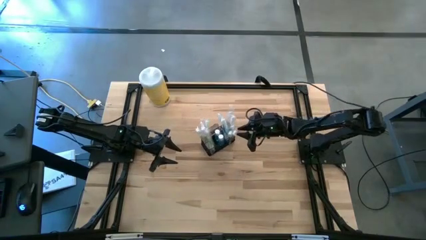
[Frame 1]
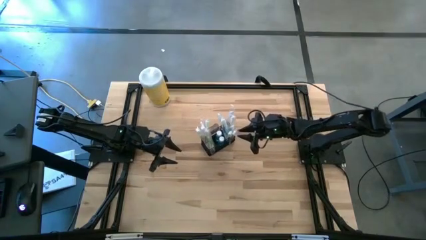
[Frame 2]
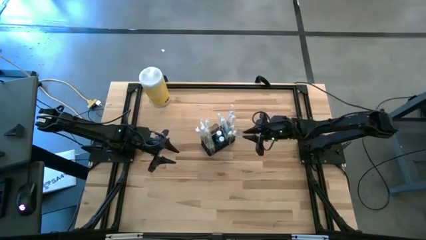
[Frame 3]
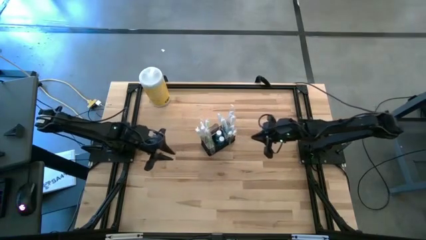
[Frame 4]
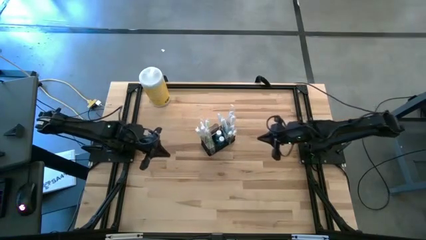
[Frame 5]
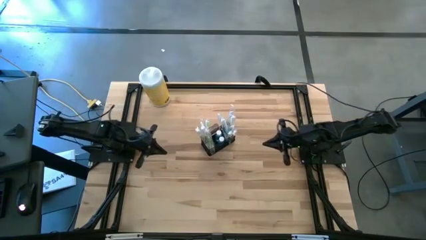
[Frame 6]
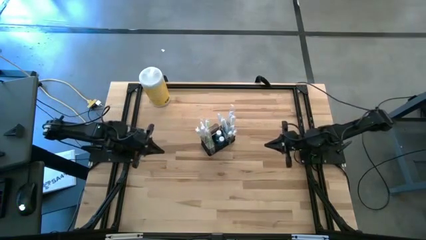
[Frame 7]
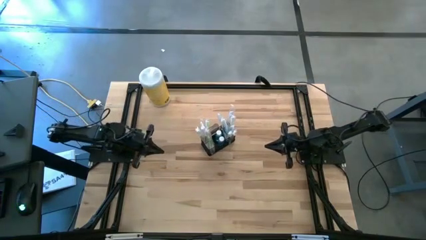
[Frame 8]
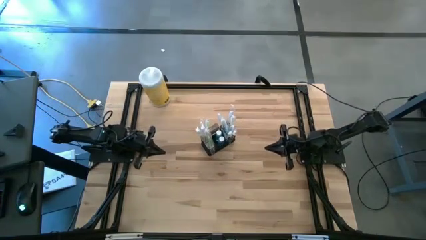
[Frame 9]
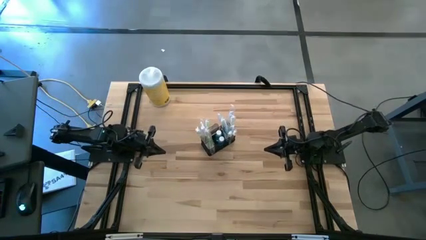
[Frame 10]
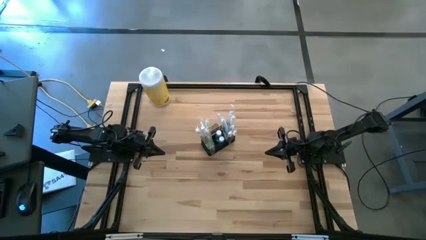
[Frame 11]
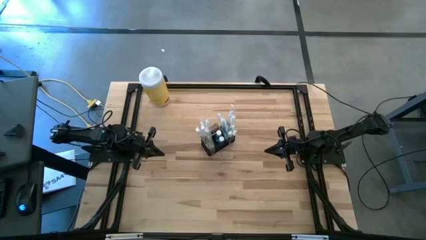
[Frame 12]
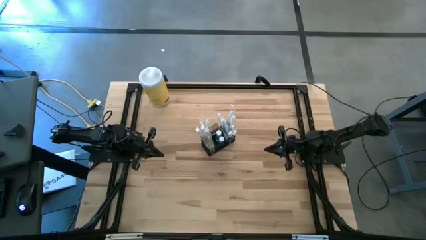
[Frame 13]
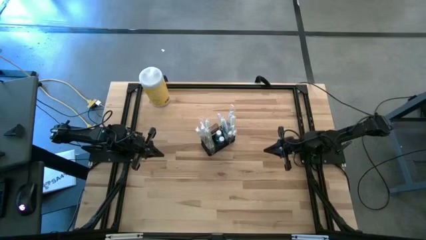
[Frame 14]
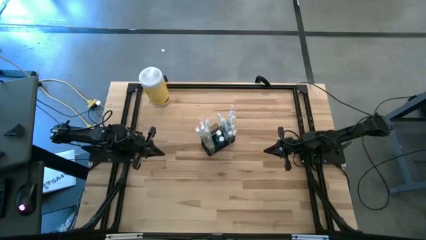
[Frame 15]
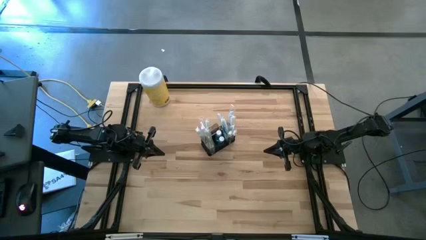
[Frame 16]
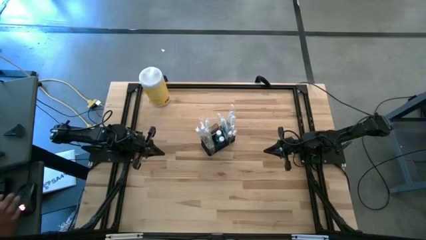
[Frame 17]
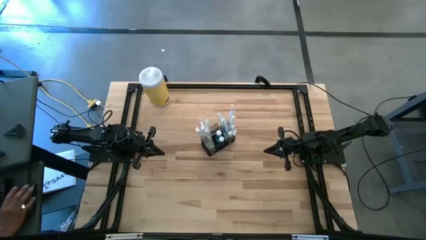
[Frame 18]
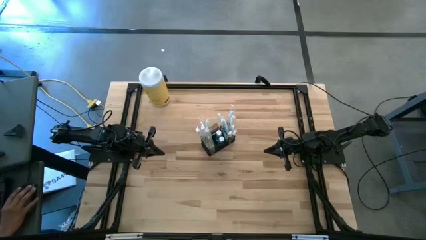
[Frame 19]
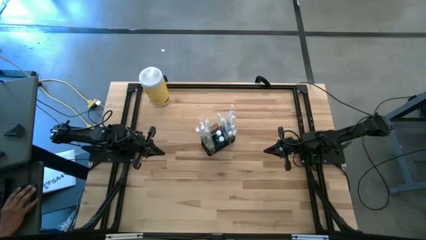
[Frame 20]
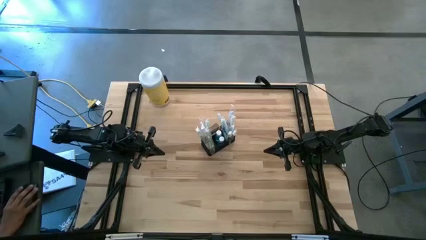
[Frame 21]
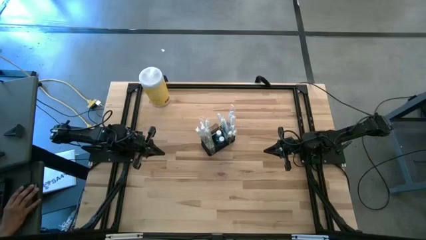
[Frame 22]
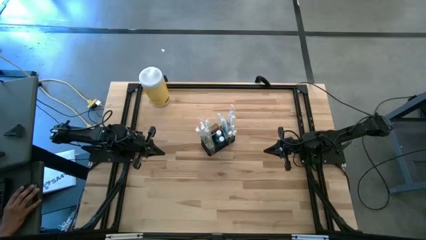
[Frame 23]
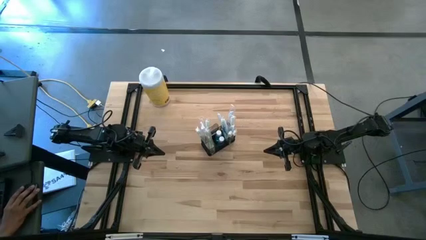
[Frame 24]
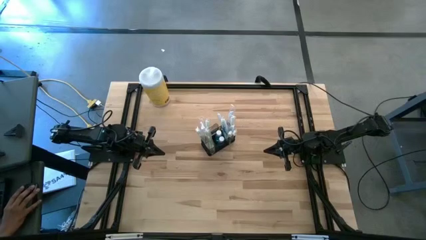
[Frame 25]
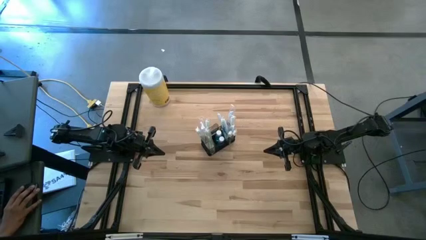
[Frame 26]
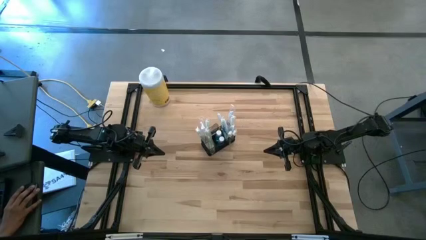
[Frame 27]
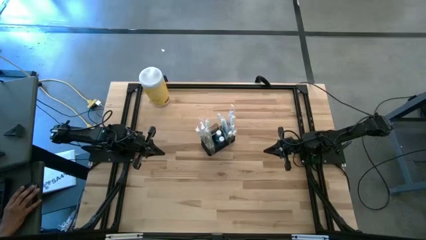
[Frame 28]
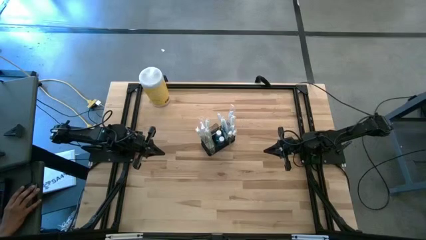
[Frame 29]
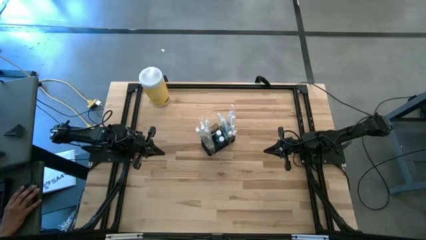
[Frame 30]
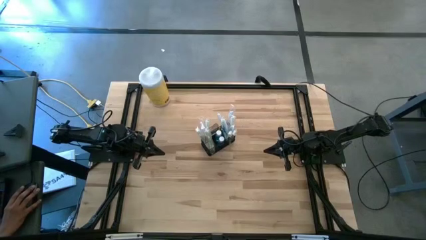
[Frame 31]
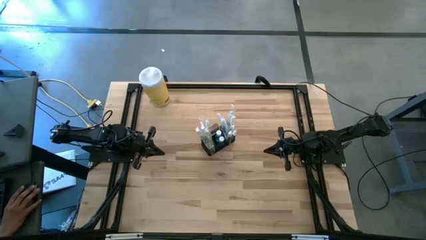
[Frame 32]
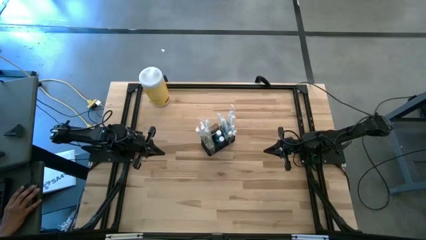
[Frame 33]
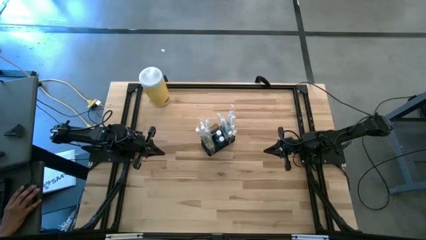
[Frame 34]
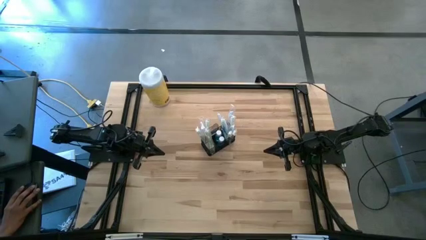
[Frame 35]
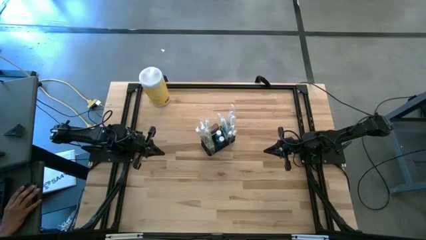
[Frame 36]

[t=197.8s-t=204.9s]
Task: Pick & Place toothbrushing station
Return to Home Position

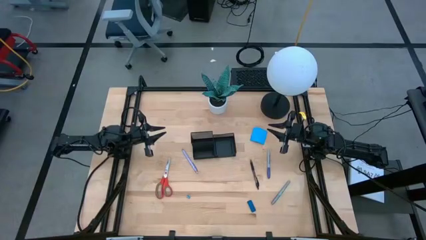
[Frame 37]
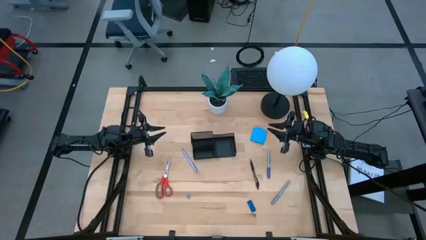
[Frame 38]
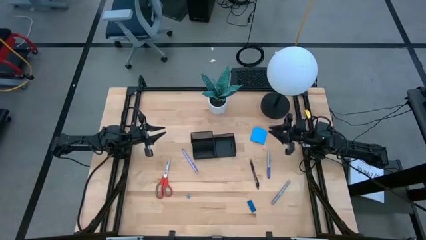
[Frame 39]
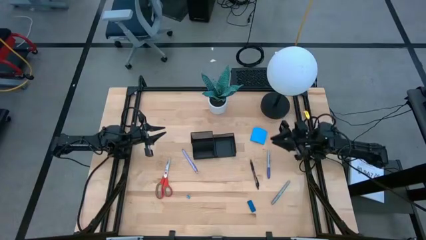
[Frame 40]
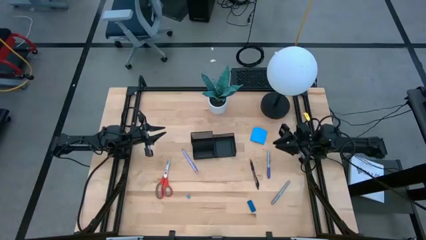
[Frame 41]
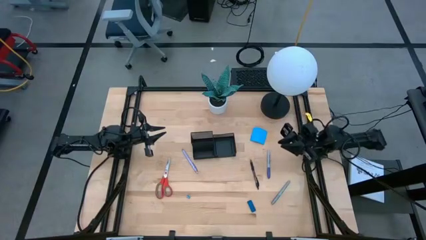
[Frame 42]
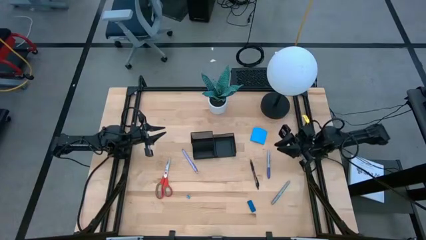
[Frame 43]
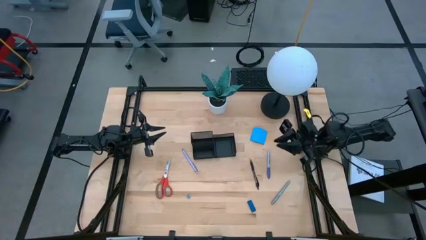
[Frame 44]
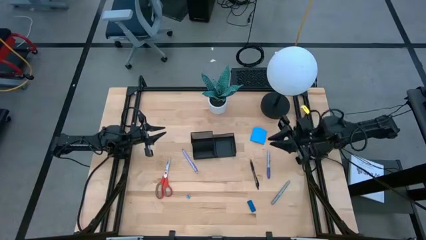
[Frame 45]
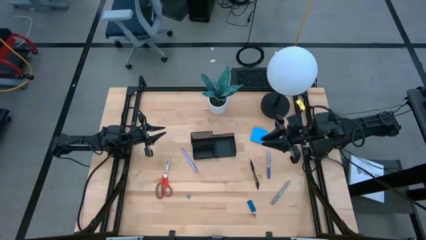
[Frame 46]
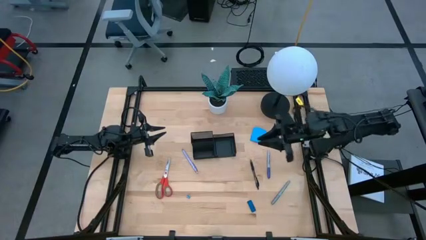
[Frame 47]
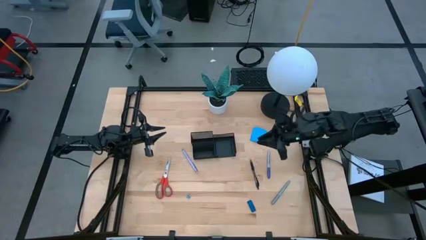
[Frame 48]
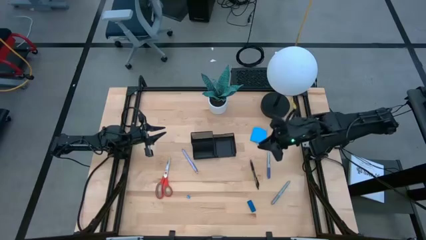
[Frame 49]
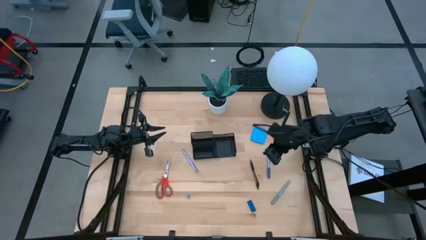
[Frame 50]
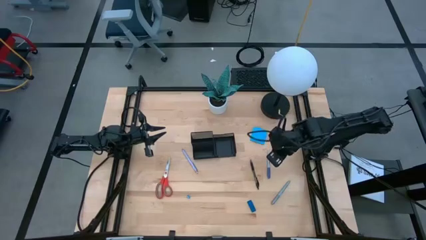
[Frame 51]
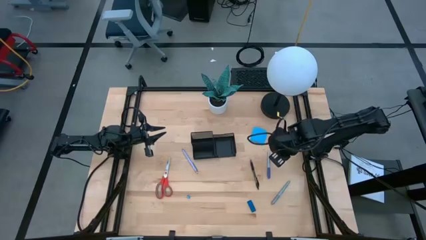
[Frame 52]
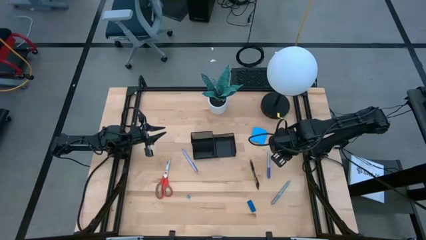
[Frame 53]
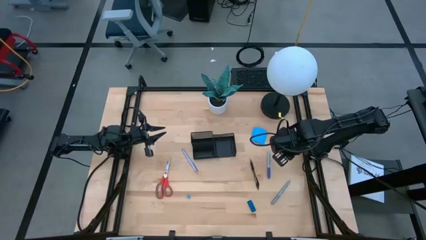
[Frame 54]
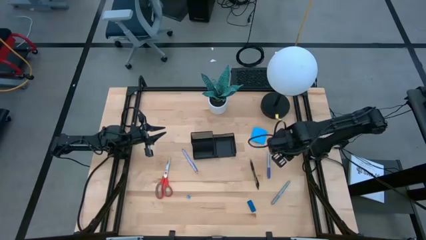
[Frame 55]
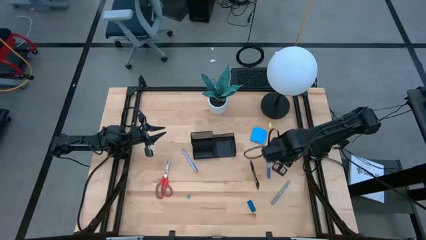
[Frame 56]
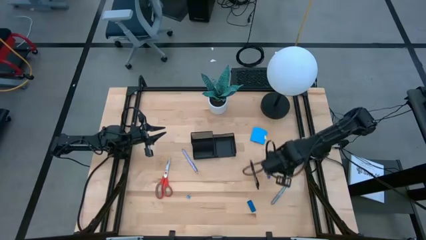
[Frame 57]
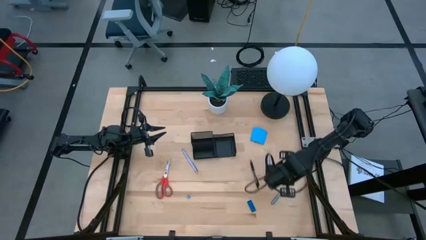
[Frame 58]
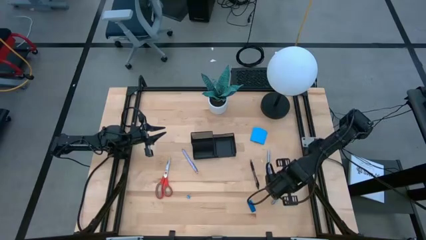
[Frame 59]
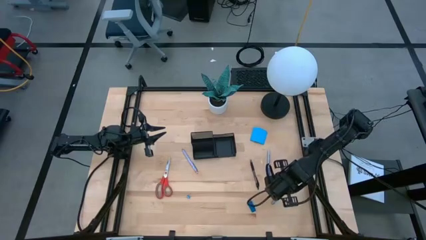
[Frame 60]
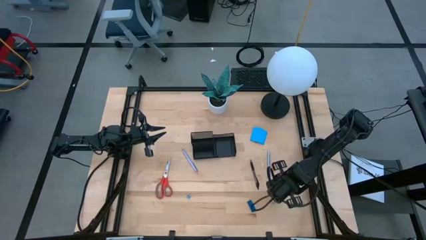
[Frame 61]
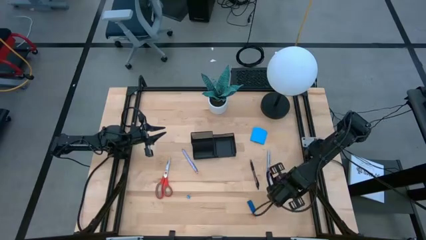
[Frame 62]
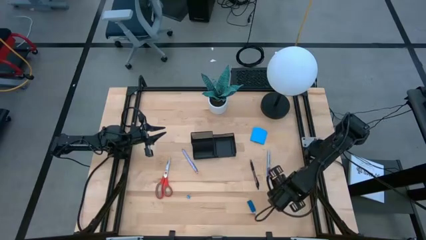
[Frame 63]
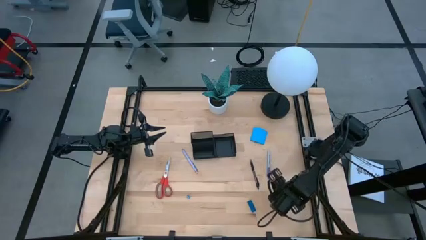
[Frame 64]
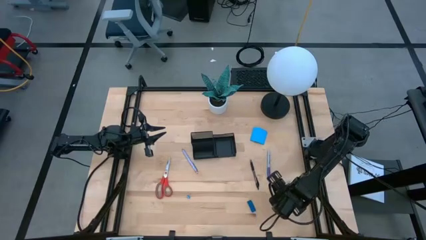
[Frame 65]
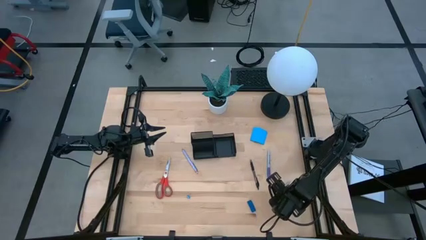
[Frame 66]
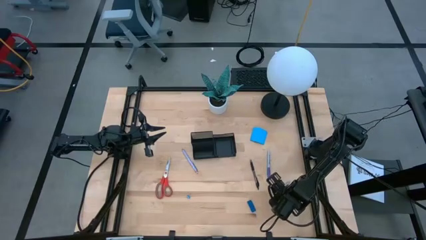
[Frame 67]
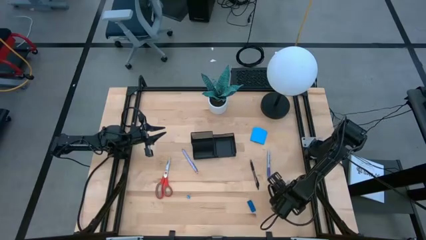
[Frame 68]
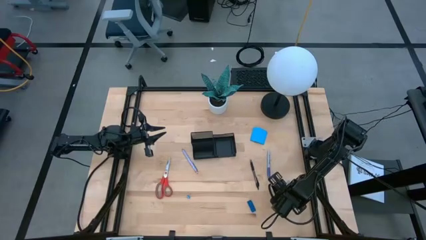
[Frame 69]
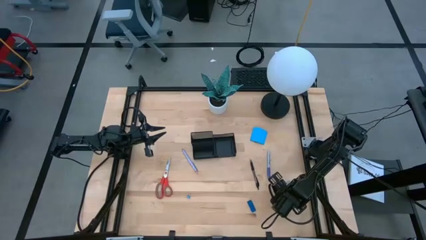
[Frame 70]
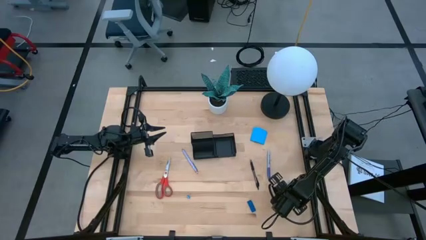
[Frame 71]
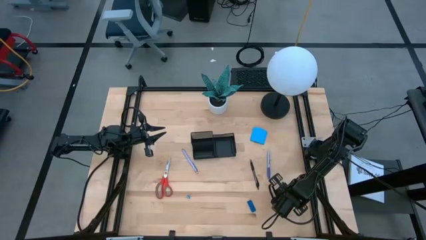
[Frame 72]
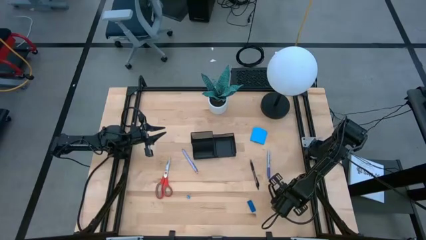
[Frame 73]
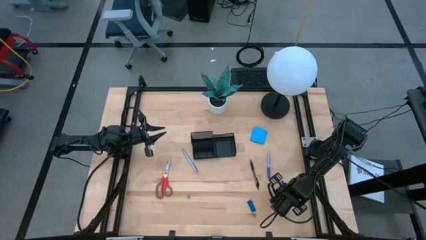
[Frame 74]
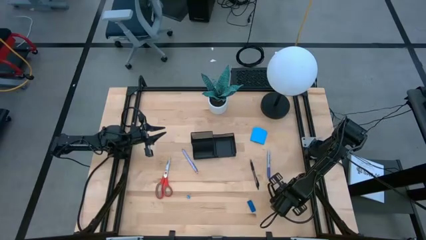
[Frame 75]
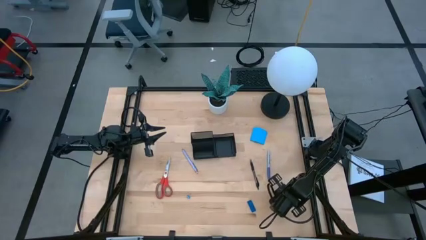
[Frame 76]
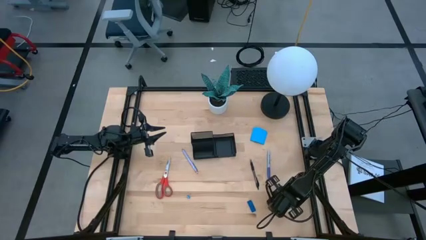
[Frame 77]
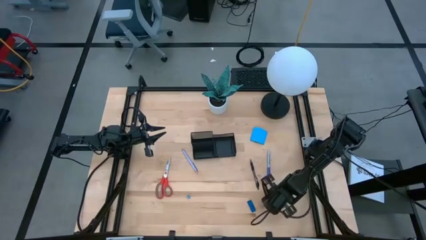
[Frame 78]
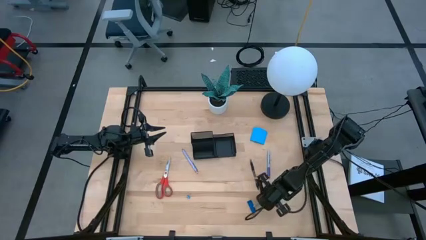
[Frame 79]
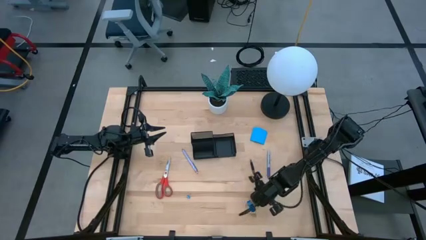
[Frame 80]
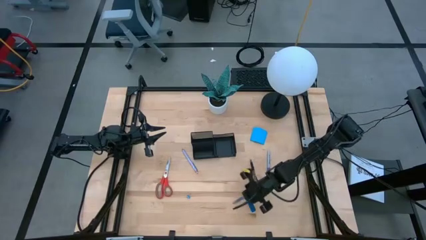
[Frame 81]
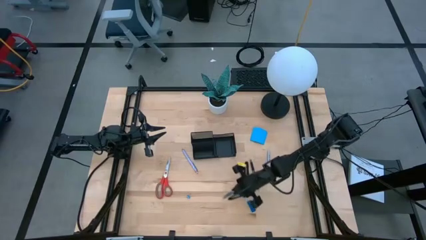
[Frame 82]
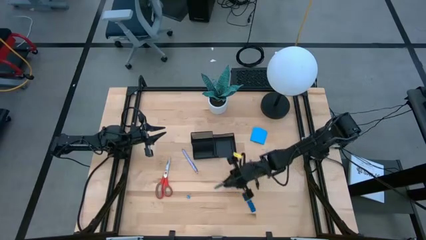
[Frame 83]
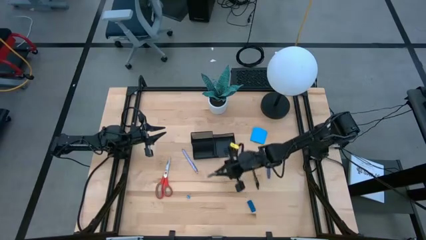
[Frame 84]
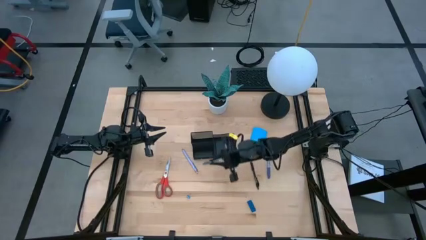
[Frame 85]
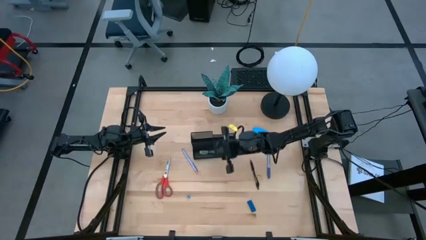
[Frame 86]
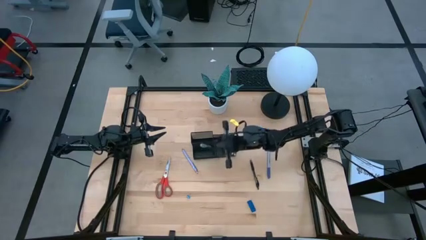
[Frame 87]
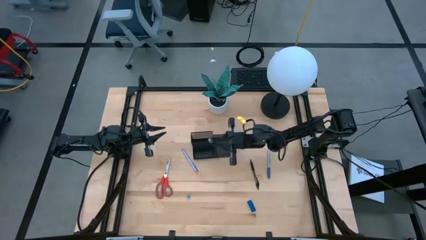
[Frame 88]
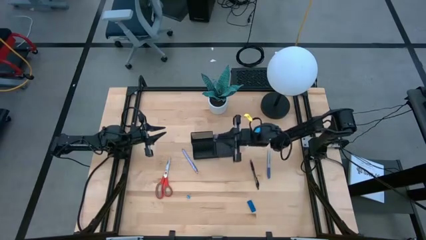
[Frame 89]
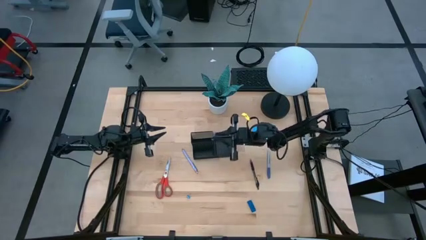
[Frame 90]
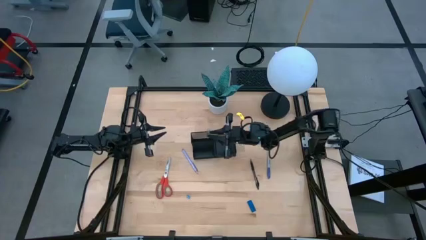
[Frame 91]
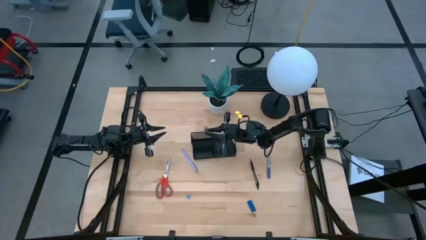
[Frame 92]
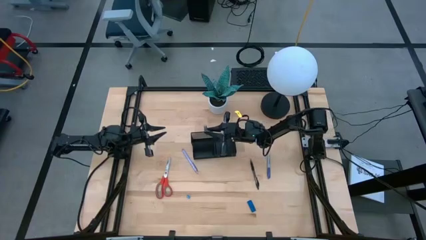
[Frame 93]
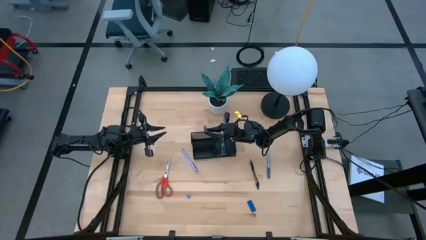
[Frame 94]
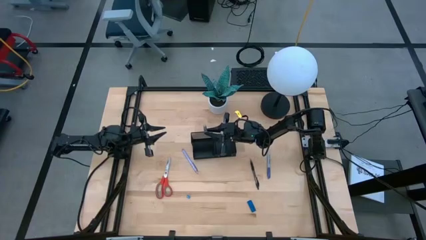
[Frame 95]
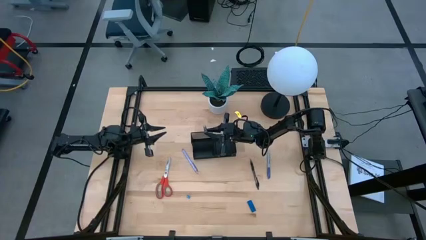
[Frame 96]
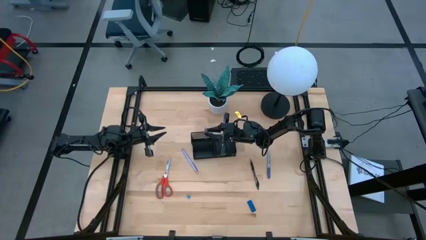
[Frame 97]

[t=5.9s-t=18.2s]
Task: Pick and place office supplies into organizer
Put the gray pen into the top left section of the desk organizer
